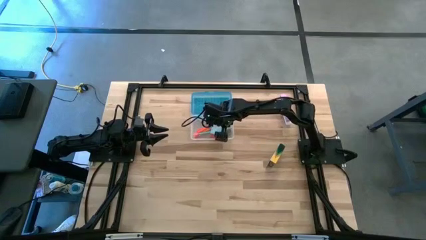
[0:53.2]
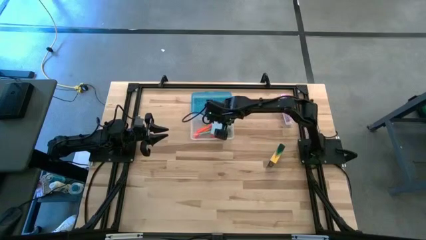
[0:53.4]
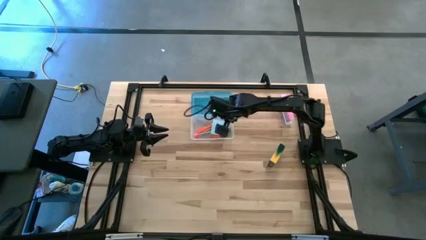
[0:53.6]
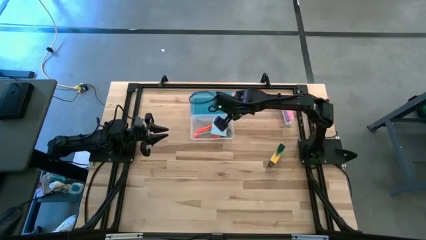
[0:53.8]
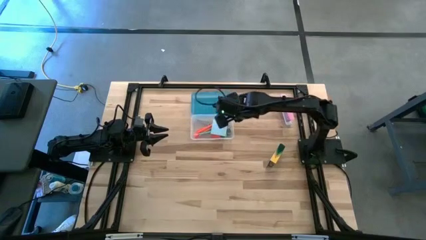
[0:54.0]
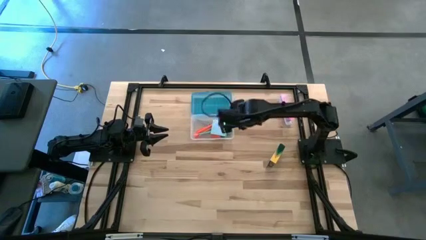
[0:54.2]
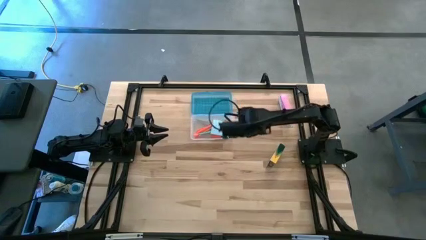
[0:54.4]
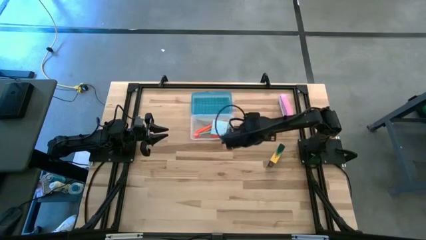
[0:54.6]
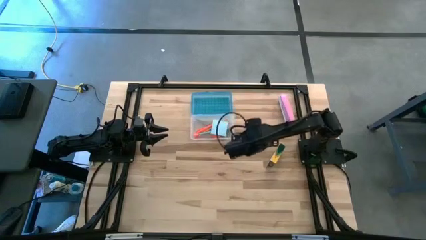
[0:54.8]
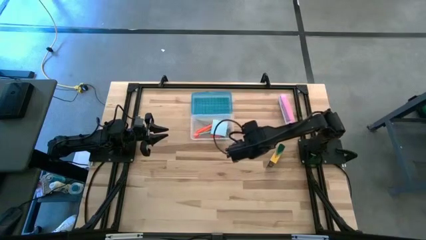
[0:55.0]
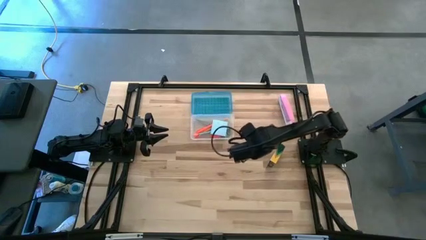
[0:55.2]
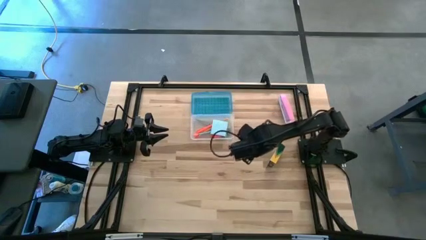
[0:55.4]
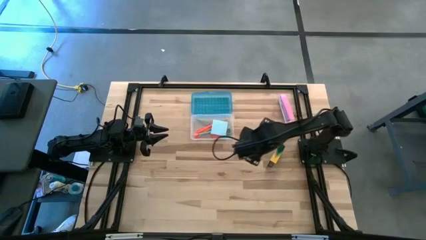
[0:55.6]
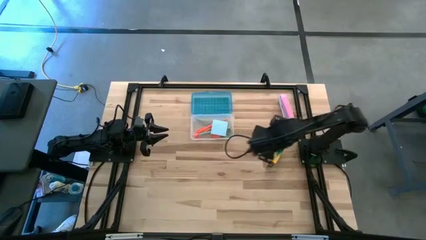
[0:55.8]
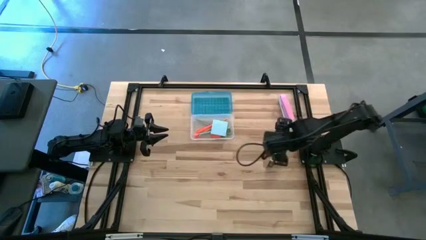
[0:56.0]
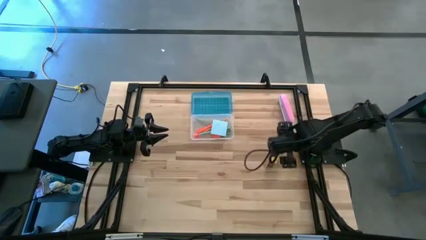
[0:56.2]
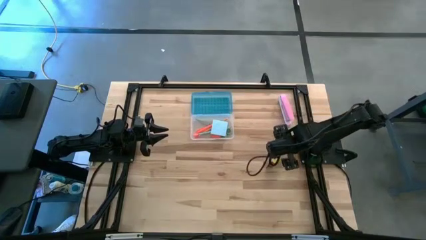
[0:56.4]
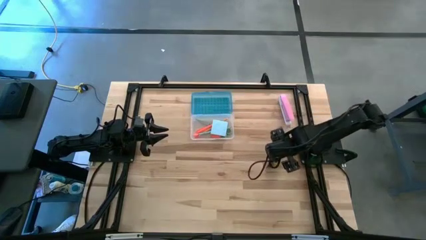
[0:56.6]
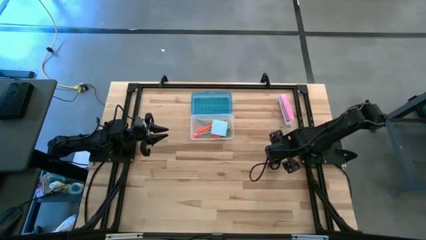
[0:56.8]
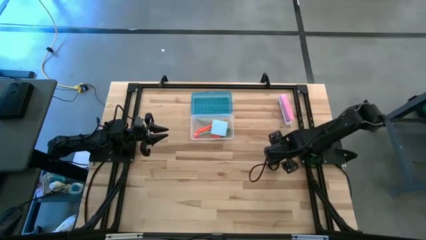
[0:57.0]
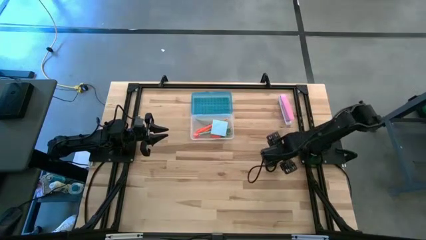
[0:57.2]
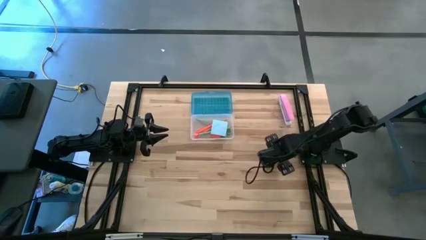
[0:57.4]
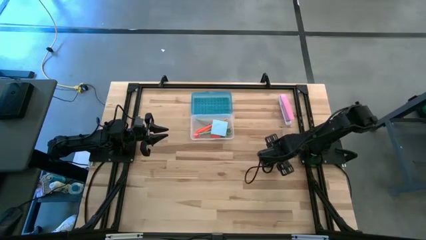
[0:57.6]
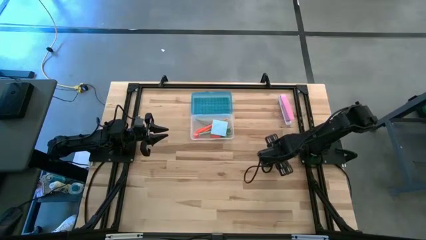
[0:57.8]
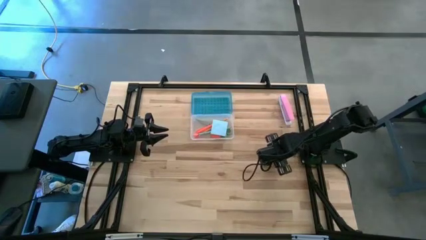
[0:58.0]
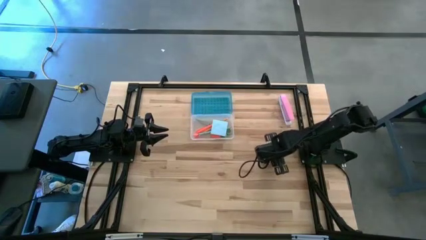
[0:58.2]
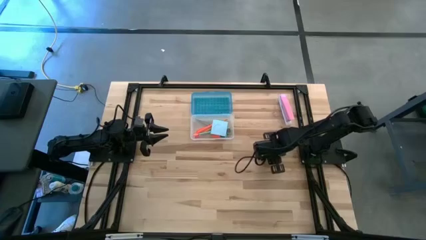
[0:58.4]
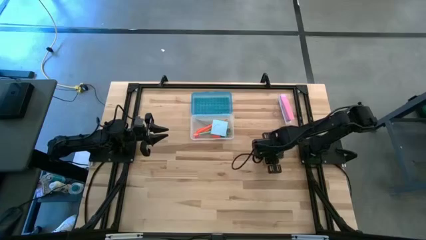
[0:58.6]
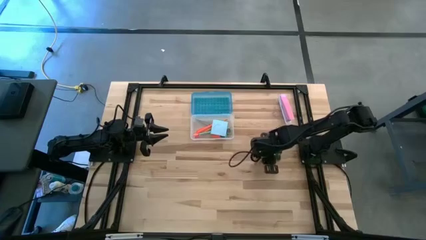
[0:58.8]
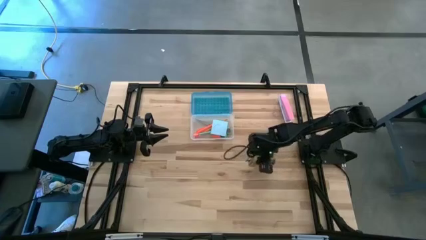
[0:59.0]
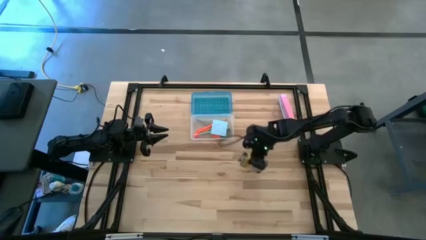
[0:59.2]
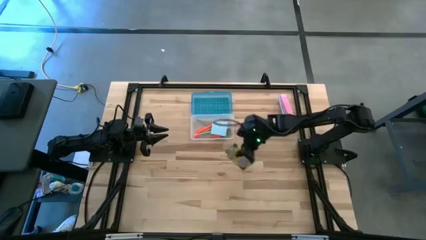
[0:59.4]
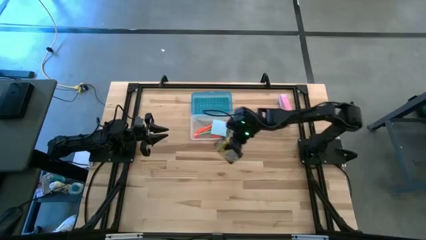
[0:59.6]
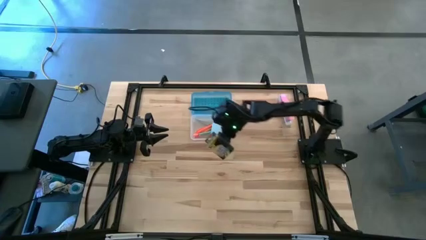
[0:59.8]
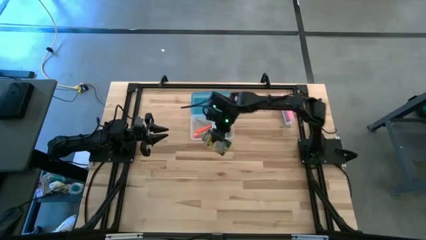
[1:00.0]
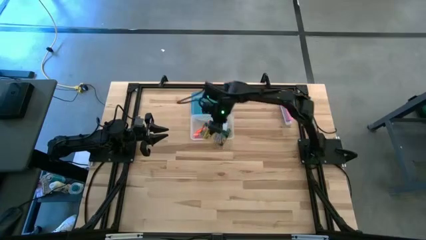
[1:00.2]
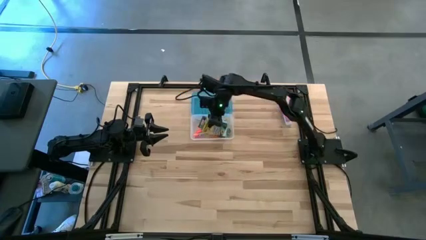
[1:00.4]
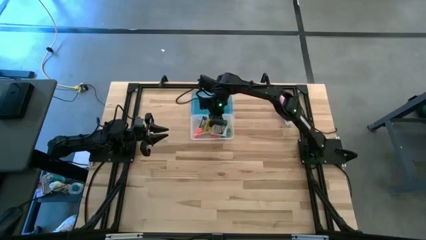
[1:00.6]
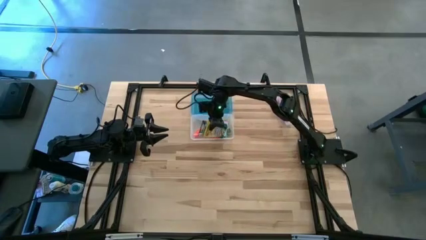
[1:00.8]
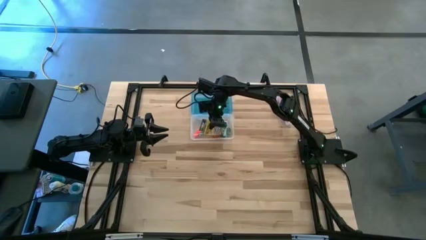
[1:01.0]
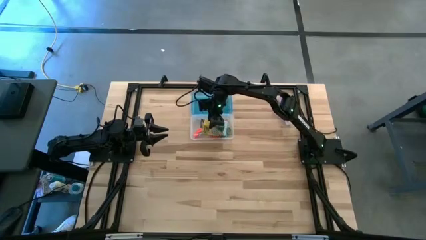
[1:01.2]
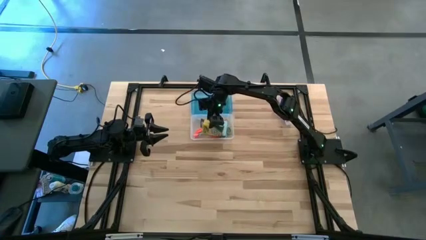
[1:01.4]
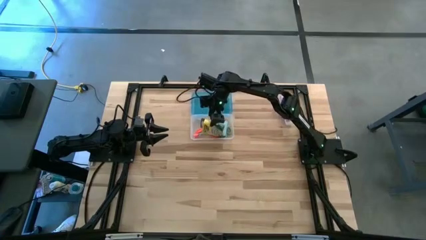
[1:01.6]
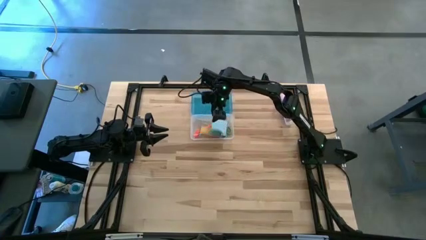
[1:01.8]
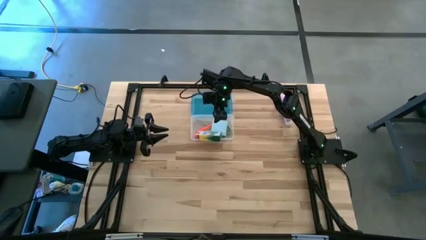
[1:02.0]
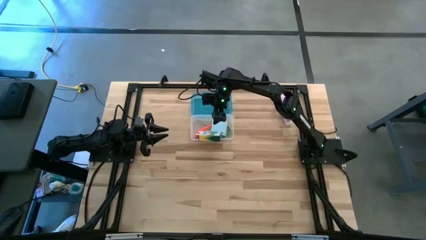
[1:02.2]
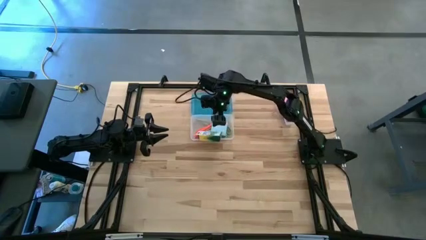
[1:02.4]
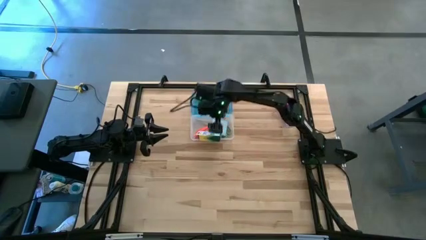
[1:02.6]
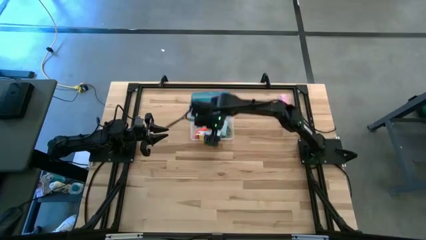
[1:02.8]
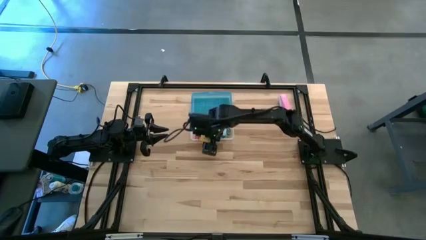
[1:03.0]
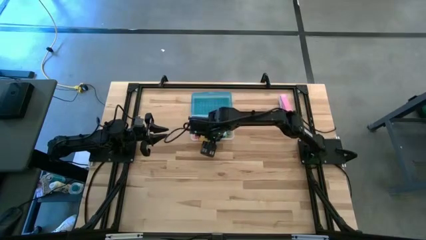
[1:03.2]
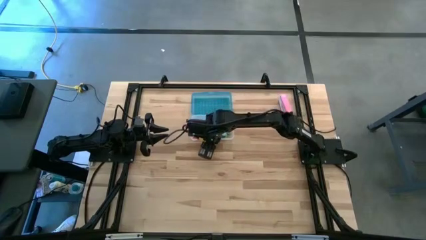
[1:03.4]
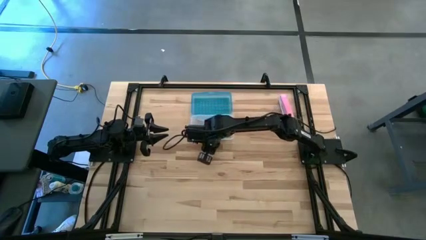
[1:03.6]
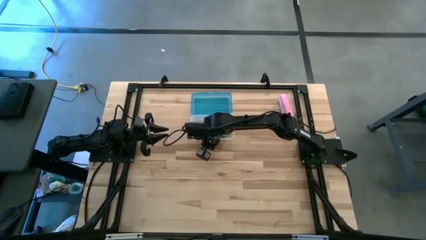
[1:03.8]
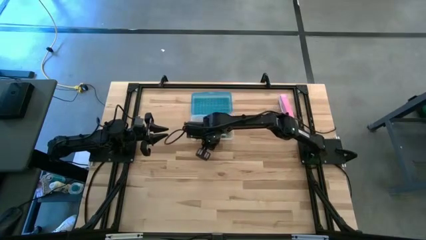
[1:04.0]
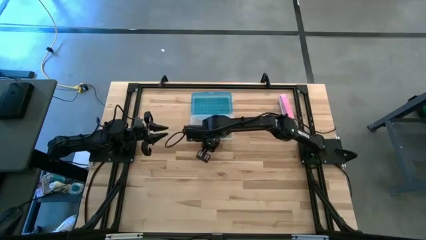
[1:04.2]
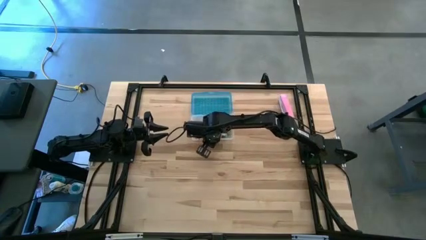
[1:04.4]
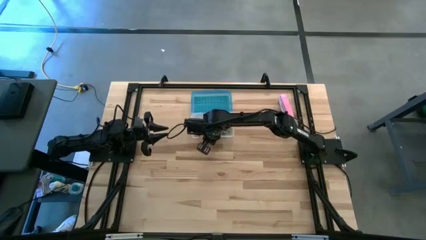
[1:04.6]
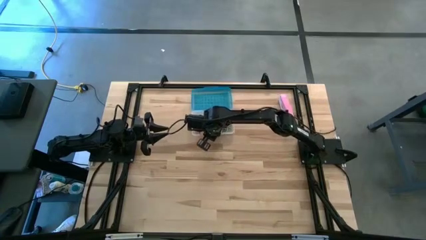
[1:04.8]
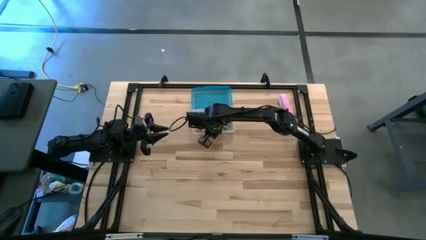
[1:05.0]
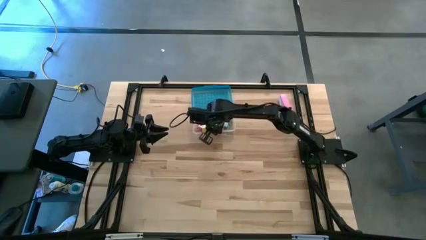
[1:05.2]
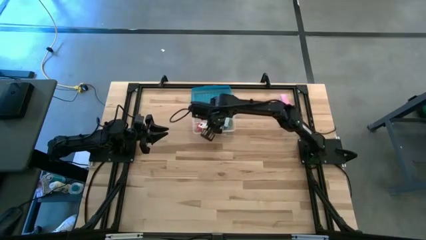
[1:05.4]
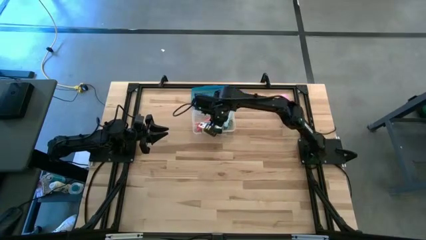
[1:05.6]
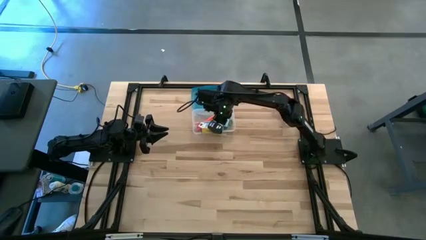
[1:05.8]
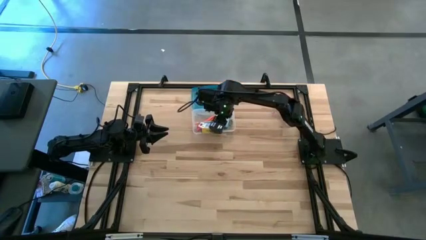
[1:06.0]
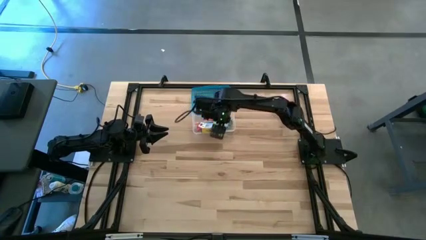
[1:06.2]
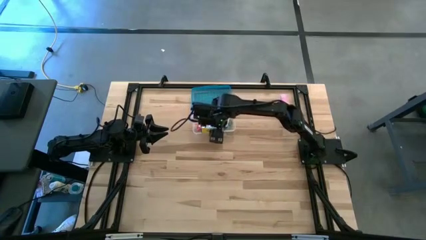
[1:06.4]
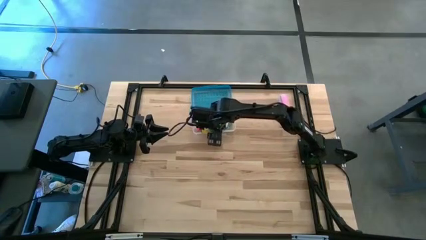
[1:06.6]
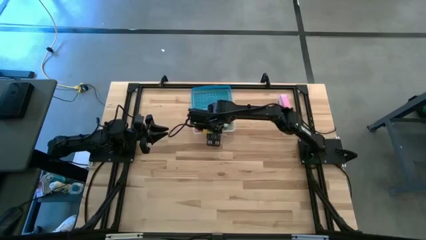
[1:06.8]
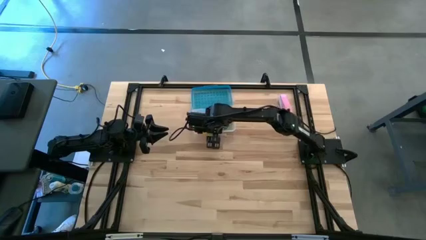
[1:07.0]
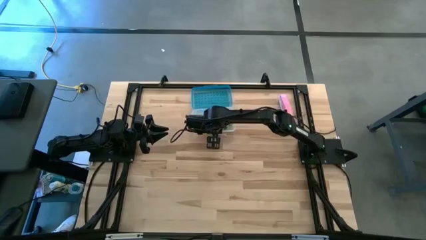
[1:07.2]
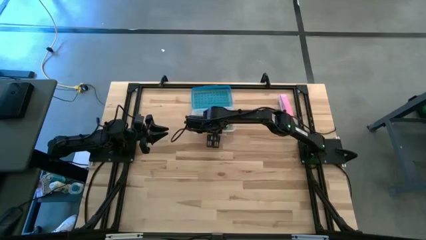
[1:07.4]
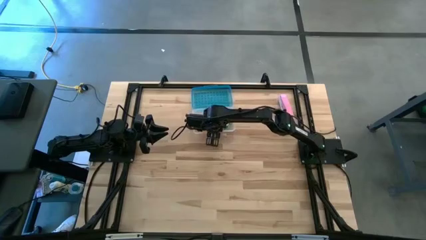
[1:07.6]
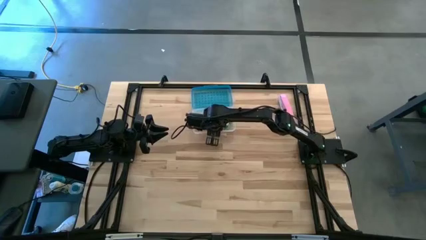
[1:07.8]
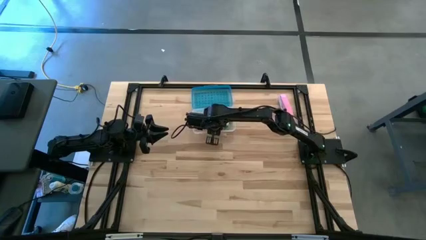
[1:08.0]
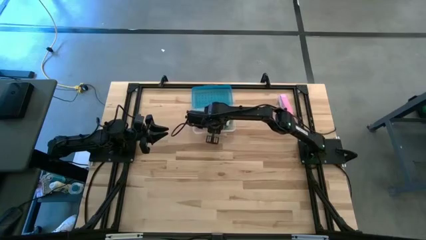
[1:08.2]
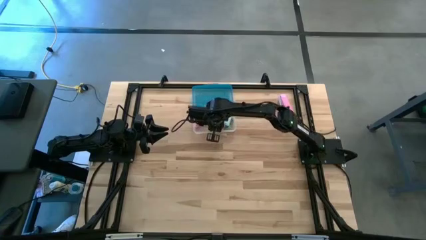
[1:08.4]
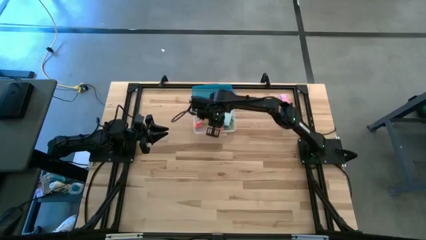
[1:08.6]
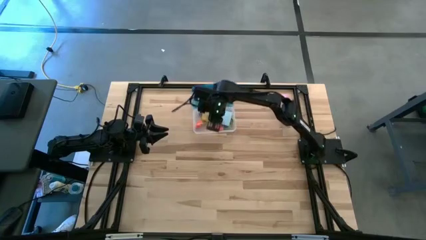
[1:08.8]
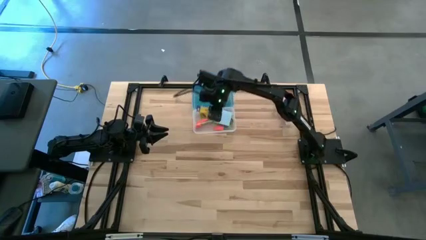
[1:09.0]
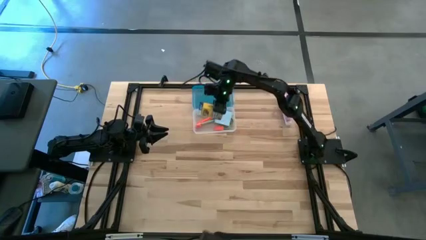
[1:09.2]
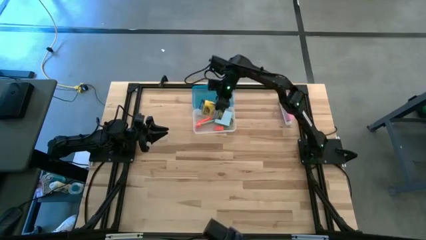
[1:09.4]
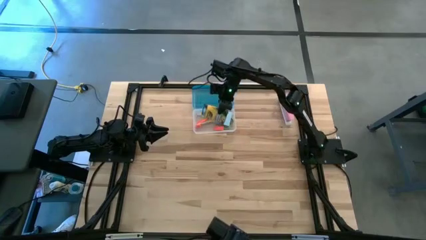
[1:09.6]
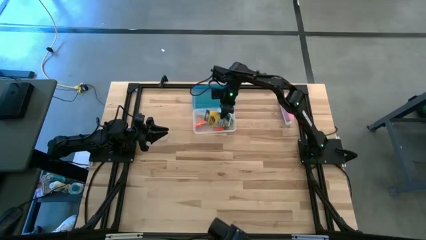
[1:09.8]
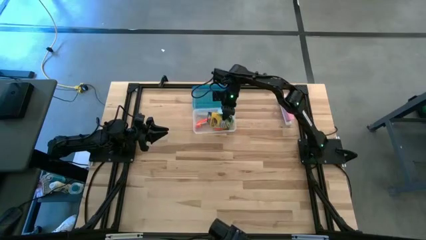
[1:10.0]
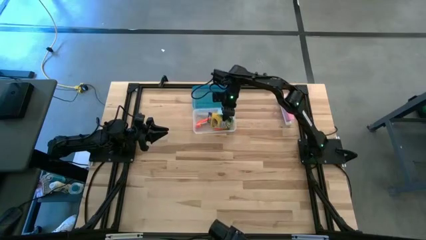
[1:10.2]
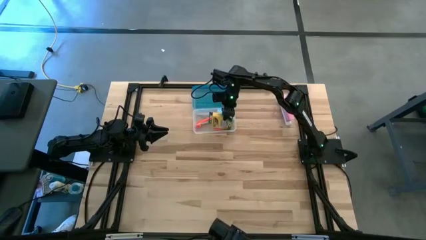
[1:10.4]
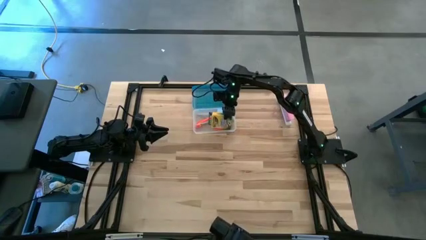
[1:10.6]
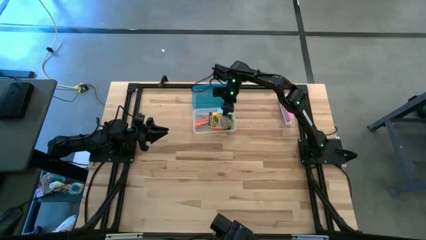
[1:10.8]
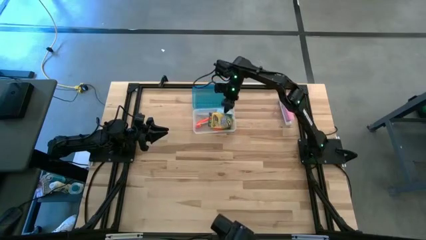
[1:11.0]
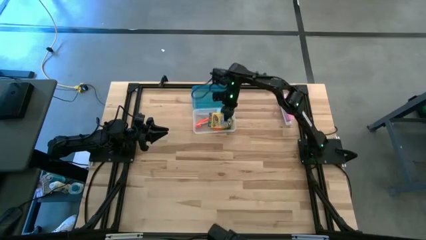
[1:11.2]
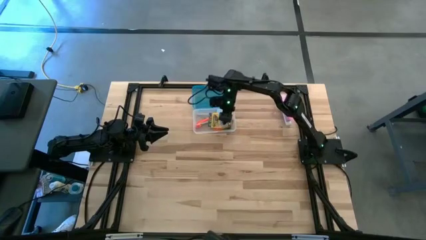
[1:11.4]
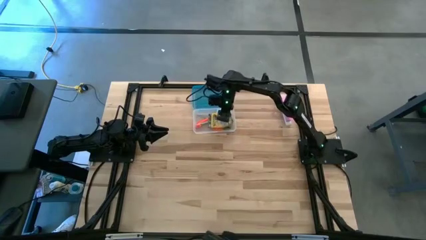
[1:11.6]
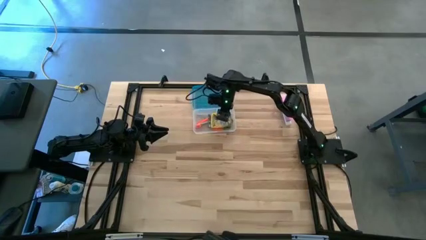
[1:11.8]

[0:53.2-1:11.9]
Task: Pack school essentials
Put the crayon box into the blue supply box
